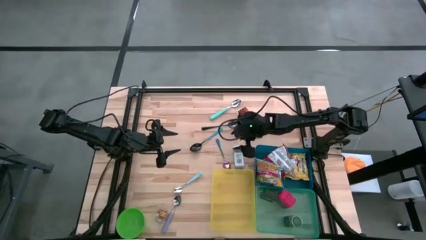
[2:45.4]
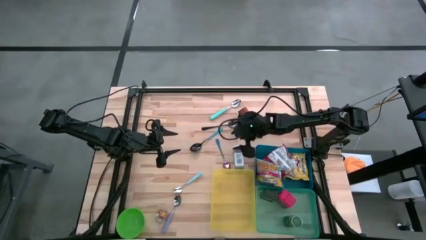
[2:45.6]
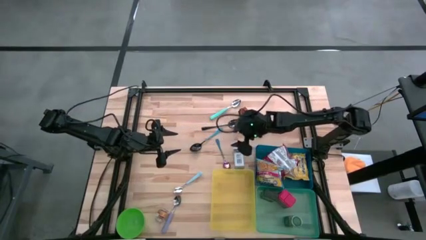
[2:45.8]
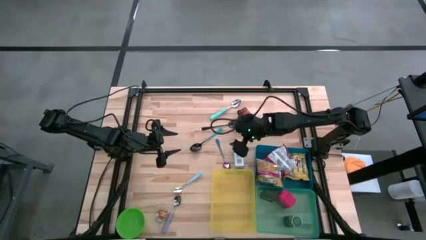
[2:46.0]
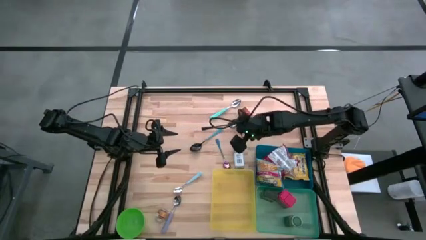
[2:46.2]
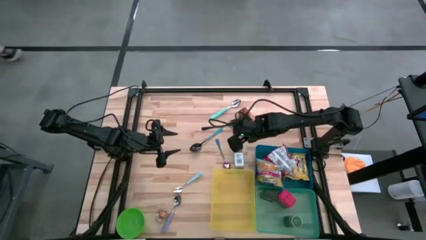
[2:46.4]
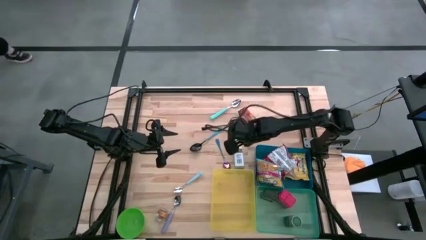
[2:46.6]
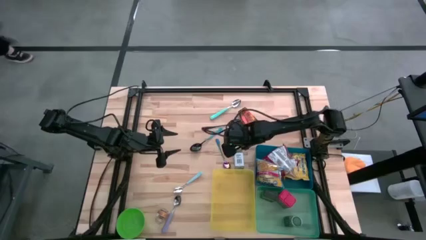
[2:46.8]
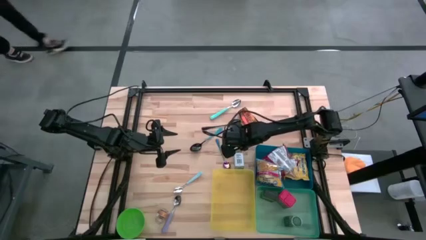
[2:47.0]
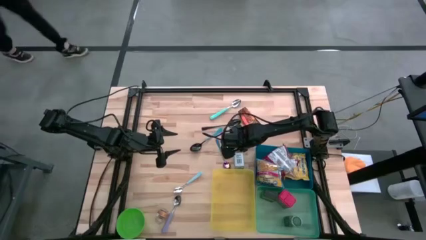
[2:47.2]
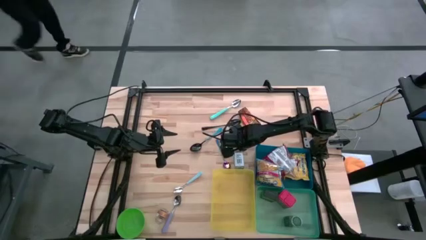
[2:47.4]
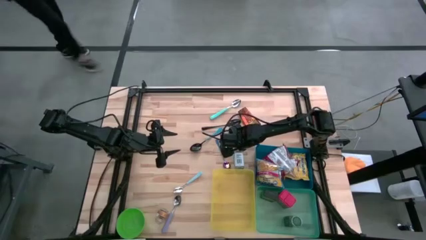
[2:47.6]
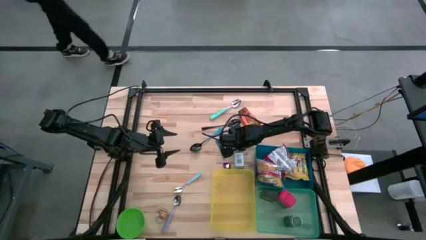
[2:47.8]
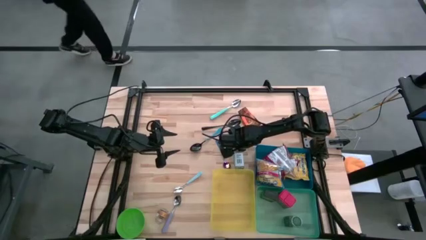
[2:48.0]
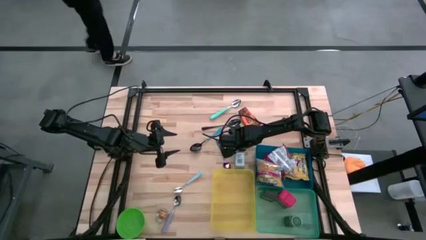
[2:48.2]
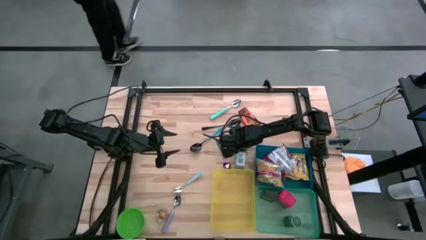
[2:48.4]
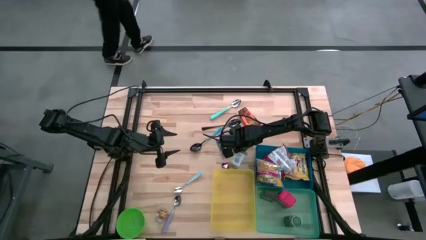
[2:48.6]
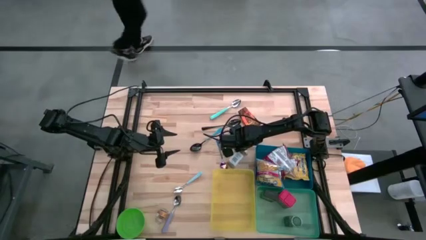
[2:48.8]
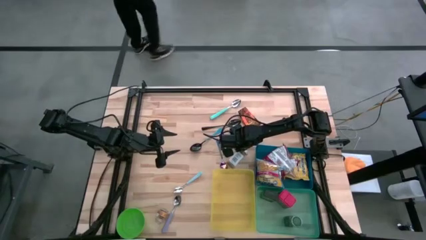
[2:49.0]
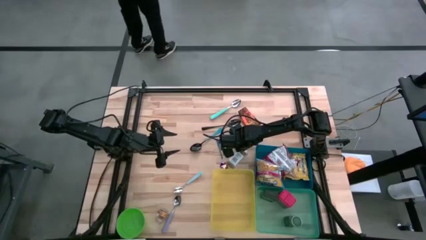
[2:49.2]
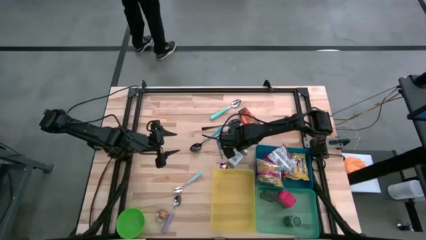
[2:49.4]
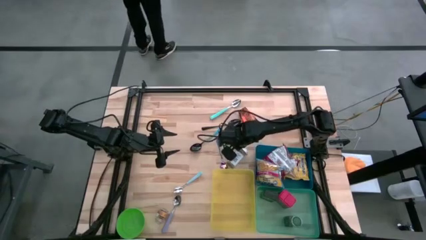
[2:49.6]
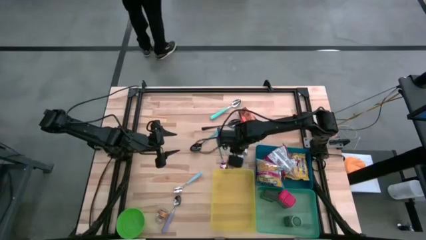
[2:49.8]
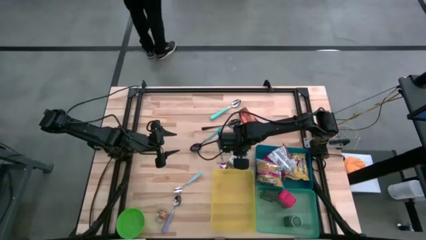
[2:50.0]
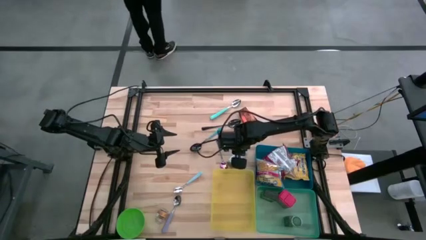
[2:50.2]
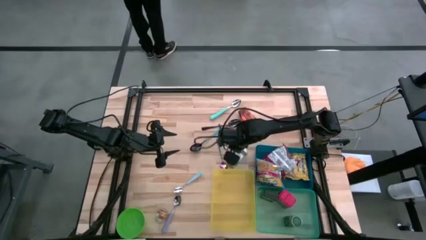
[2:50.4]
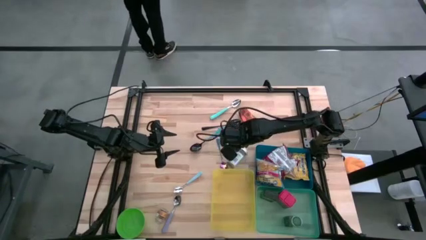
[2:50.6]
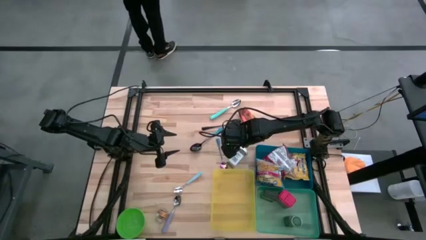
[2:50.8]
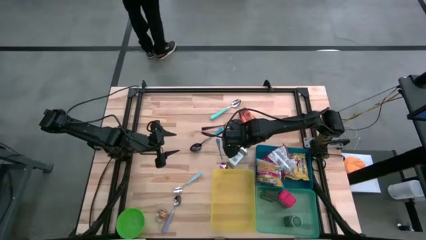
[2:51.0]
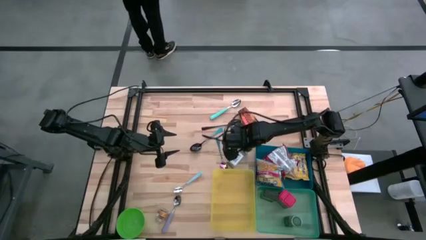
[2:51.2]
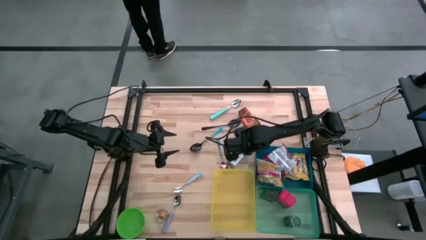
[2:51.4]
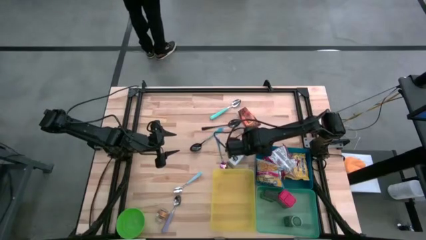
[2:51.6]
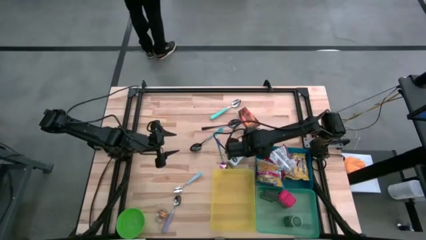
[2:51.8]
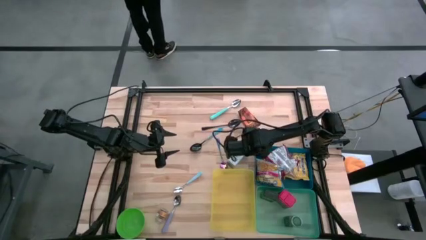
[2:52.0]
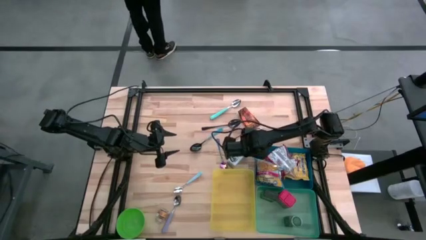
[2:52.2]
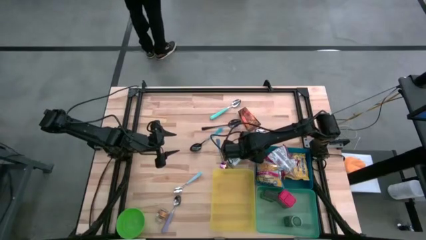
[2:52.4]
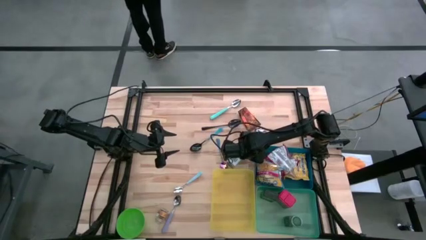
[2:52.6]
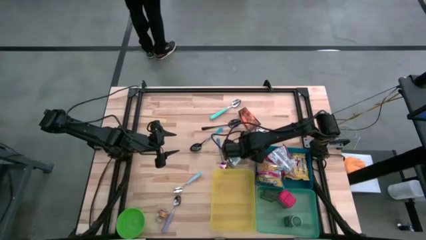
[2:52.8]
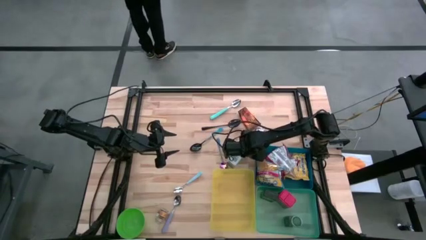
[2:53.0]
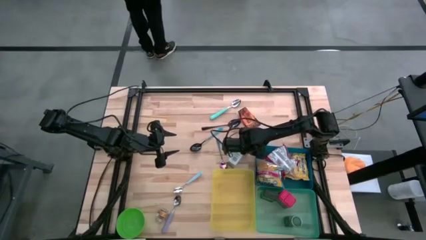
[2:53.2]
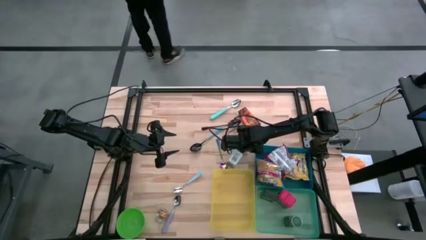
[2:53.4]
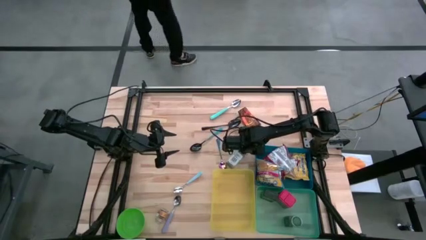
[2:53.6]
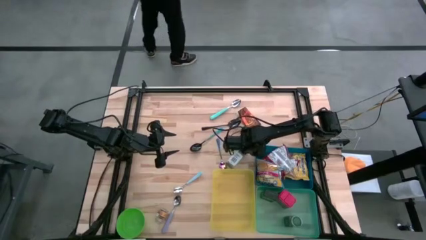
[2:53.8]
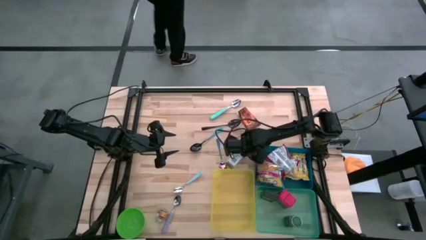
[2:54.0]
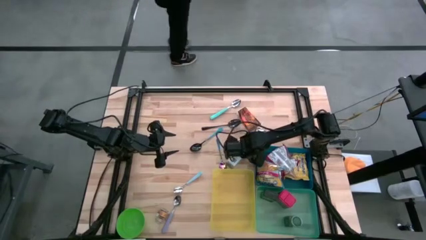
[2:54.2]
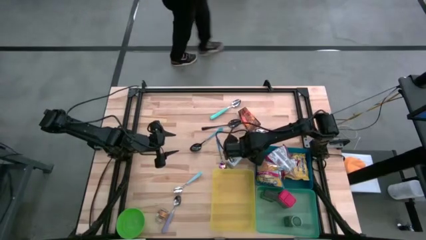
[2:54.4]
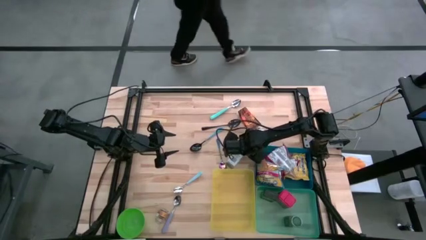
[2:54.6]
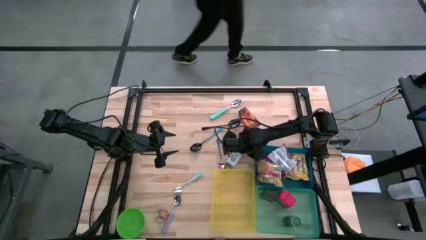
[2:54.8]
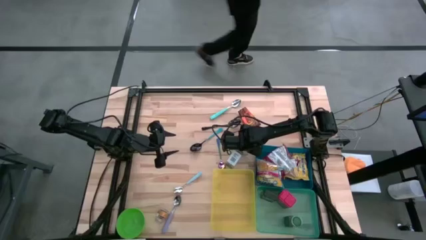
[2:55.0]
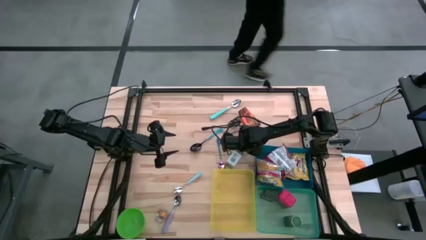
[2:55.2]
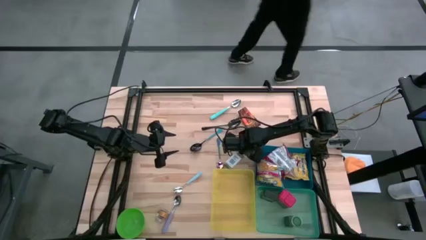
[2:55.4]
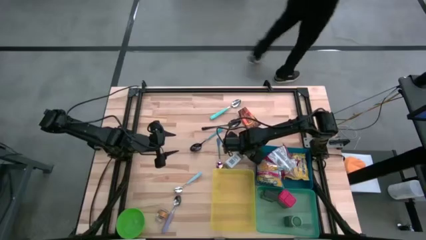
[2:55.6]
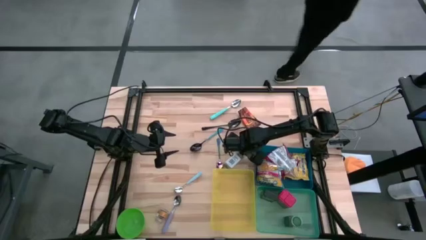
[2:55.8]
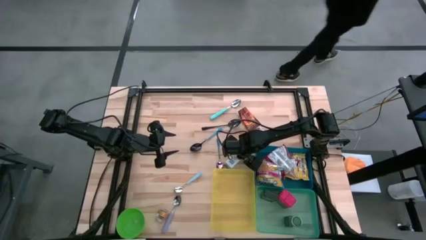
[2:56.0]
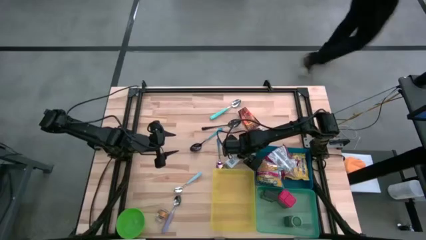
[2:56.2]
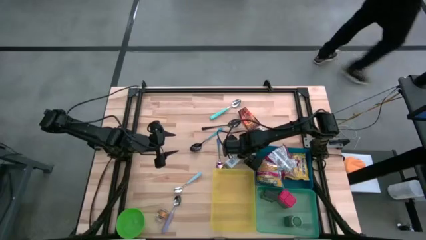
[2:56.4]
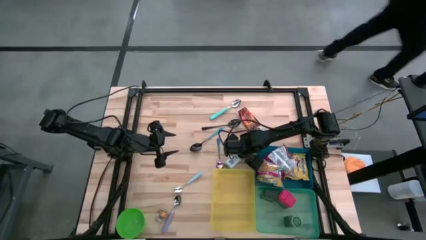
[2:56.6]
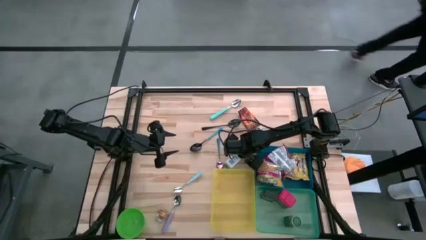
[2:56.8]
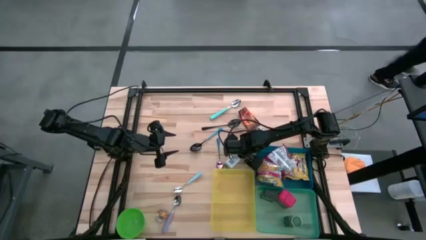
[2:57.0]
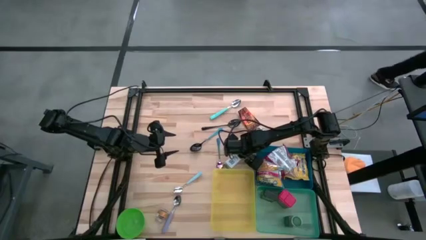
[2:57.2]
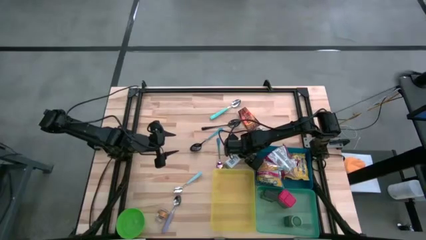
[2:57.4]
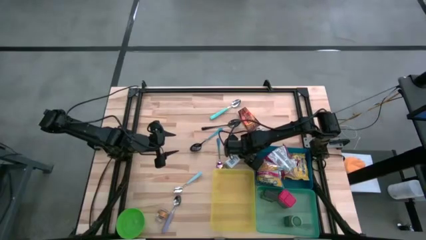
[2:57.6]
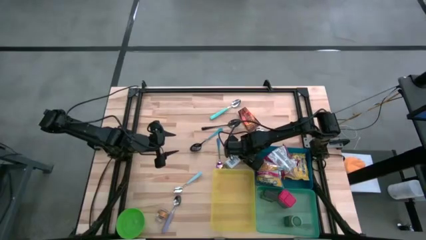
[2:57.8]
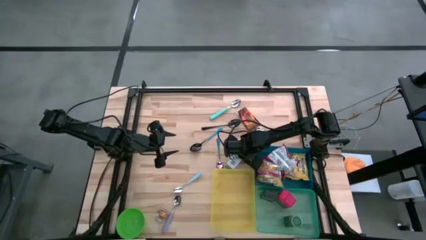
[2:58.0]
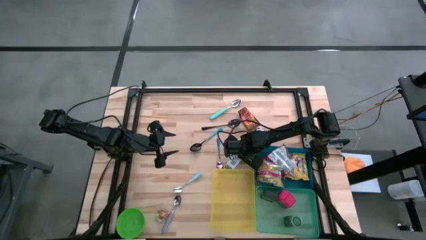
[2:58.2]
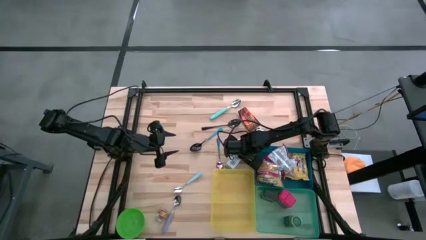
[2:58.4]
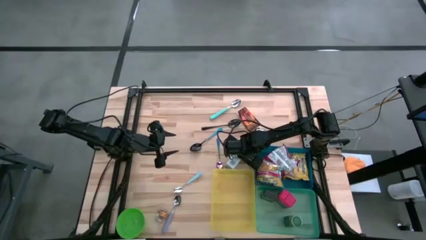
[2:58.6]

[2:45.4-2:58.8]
Put the white seasoning bottle into the green bin
